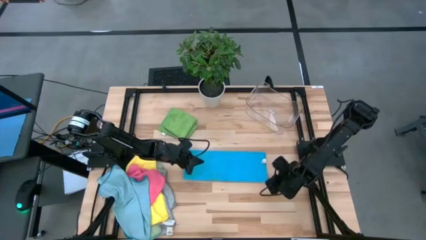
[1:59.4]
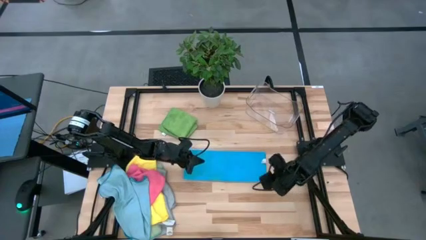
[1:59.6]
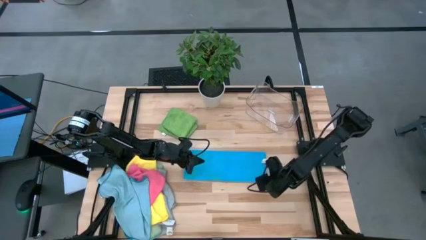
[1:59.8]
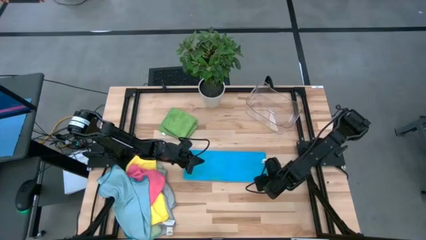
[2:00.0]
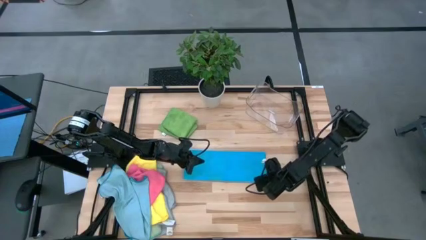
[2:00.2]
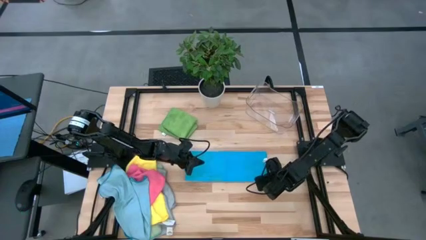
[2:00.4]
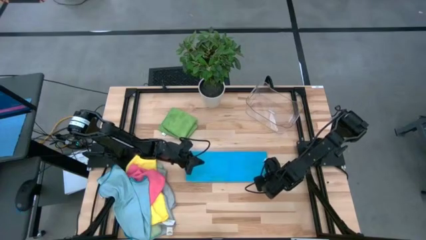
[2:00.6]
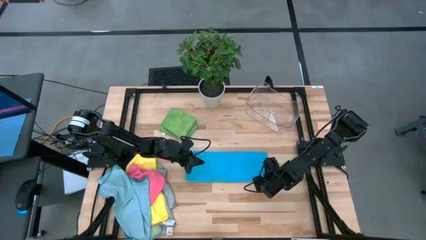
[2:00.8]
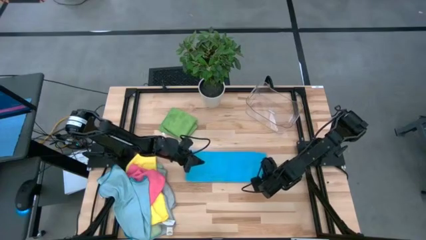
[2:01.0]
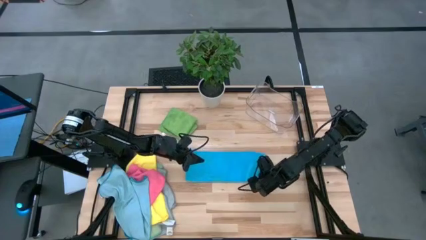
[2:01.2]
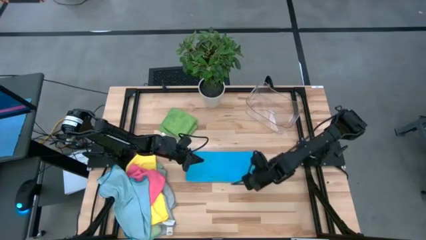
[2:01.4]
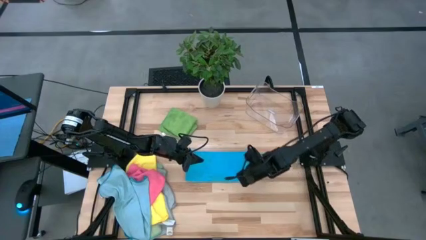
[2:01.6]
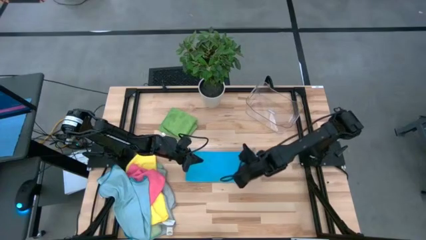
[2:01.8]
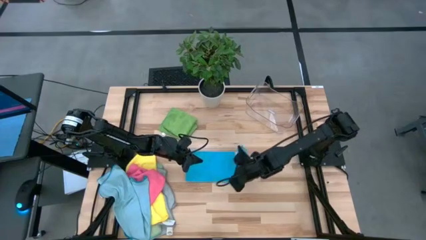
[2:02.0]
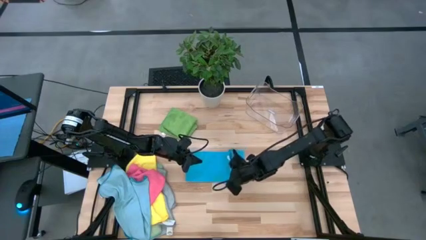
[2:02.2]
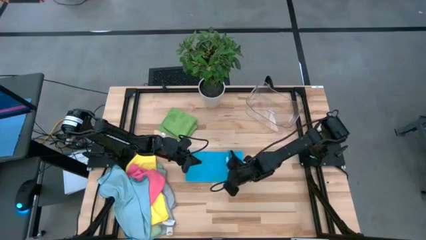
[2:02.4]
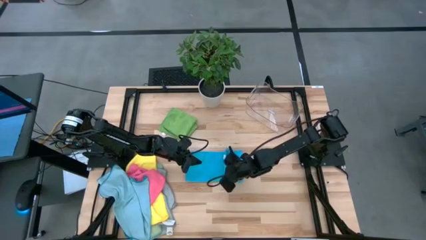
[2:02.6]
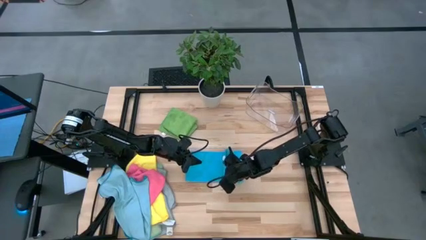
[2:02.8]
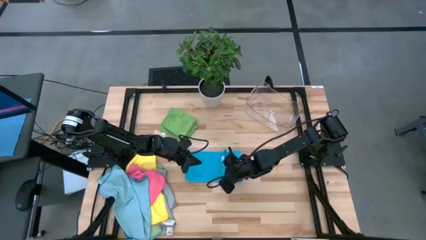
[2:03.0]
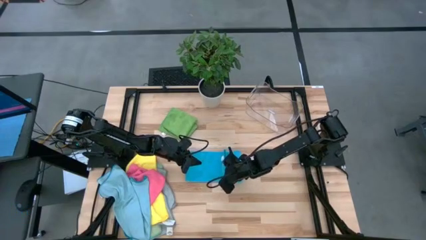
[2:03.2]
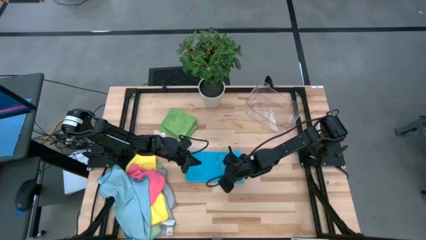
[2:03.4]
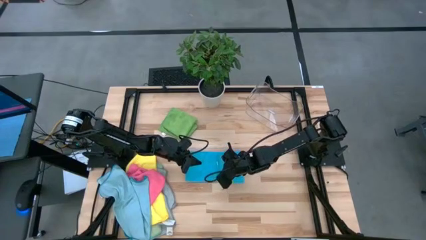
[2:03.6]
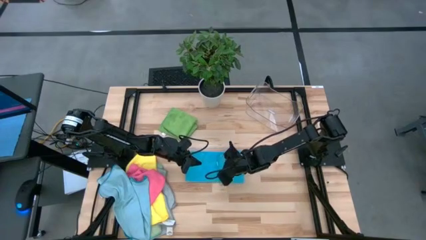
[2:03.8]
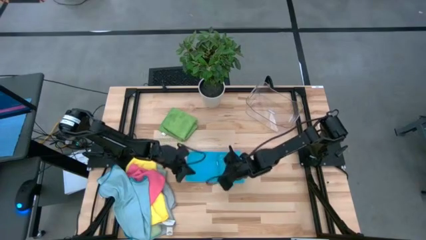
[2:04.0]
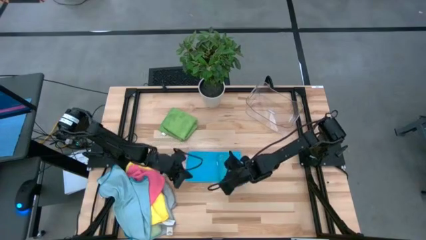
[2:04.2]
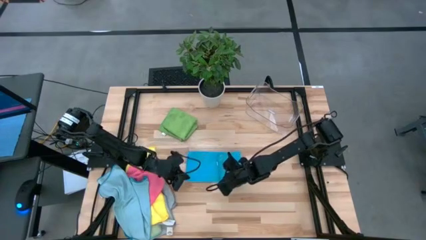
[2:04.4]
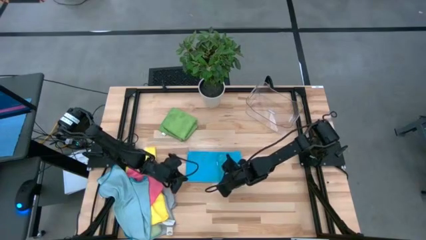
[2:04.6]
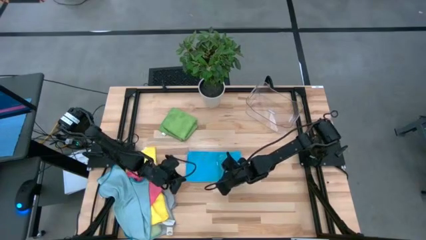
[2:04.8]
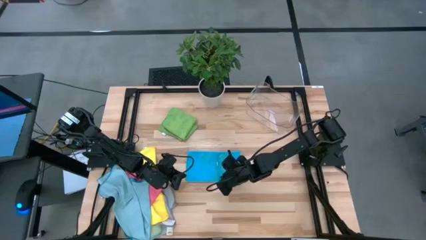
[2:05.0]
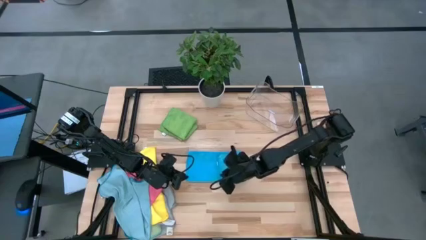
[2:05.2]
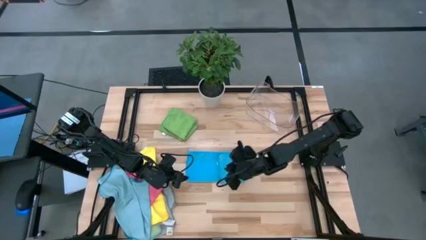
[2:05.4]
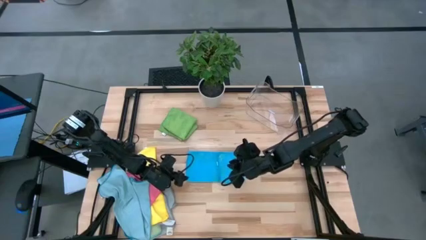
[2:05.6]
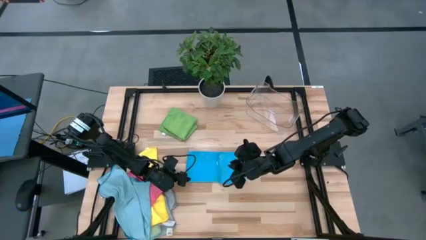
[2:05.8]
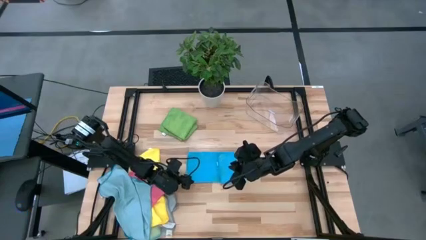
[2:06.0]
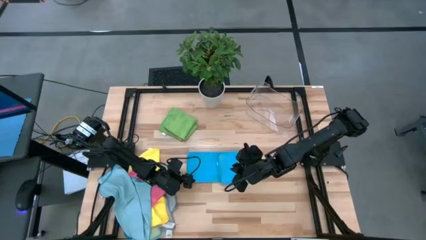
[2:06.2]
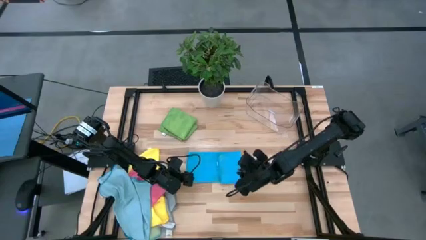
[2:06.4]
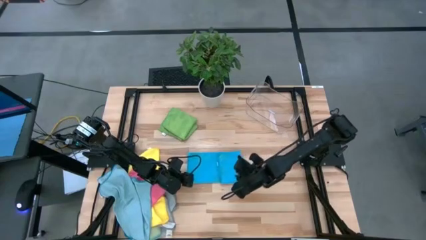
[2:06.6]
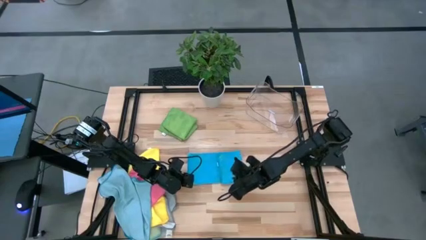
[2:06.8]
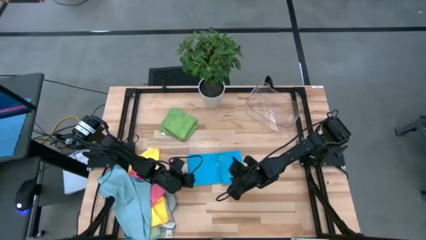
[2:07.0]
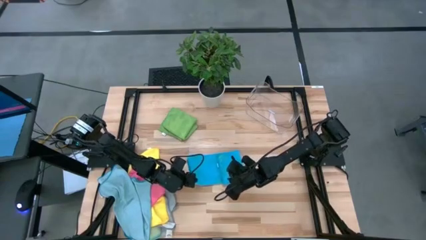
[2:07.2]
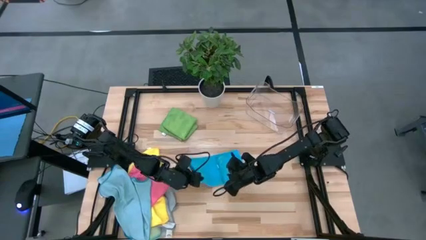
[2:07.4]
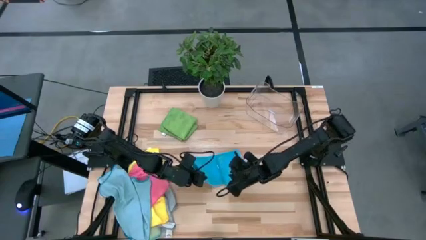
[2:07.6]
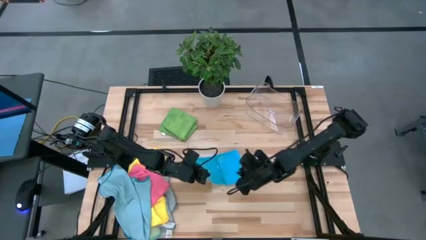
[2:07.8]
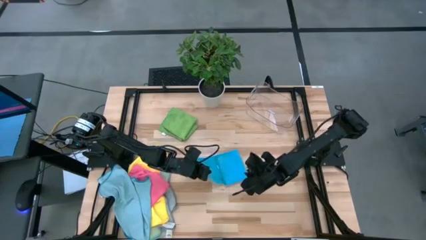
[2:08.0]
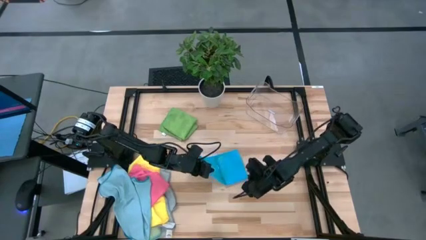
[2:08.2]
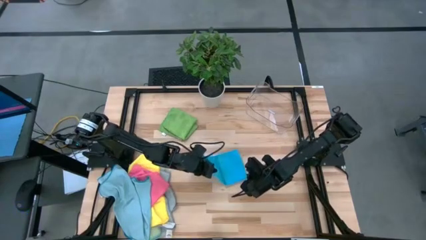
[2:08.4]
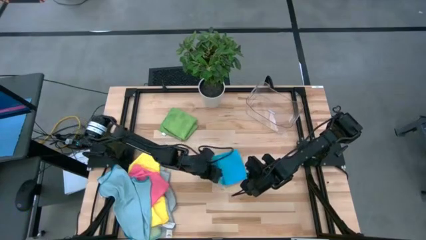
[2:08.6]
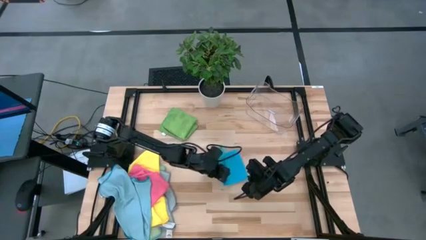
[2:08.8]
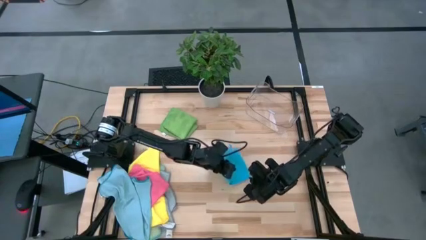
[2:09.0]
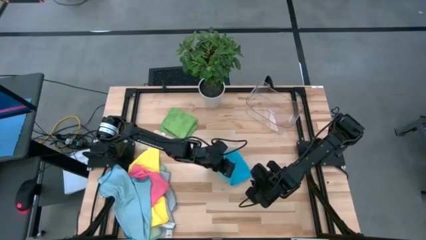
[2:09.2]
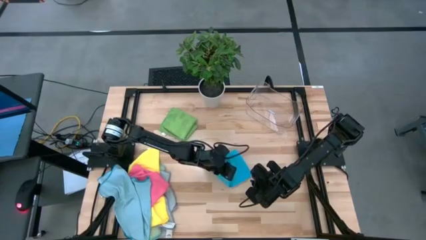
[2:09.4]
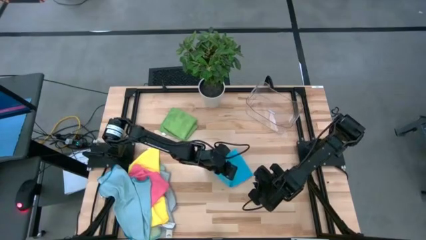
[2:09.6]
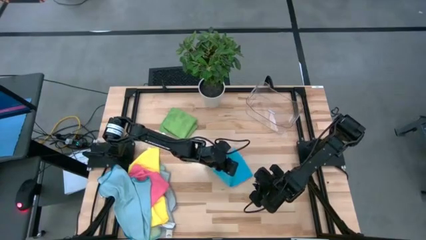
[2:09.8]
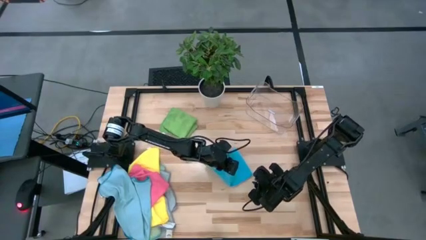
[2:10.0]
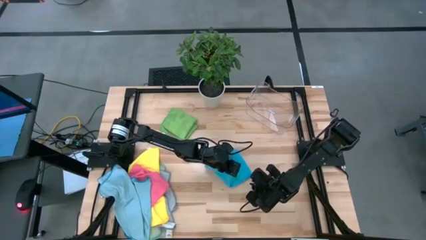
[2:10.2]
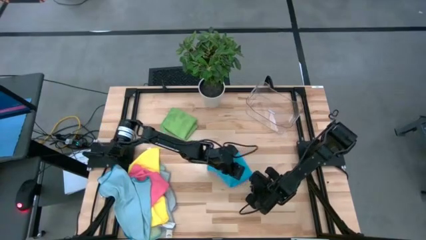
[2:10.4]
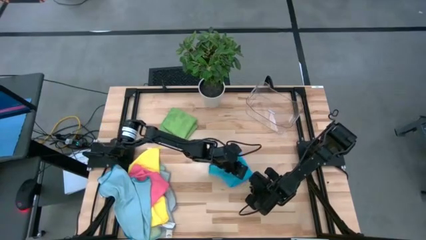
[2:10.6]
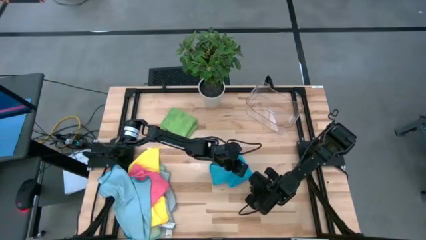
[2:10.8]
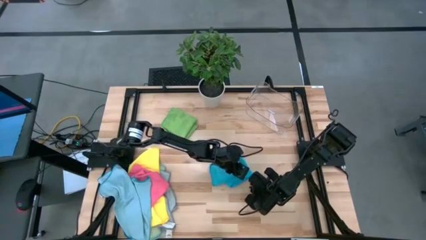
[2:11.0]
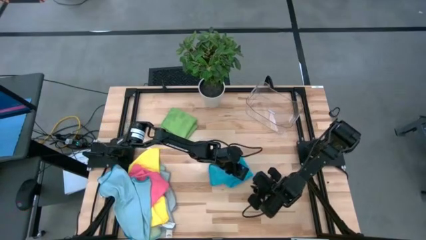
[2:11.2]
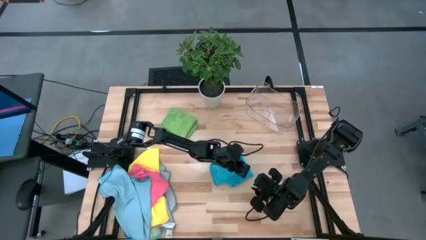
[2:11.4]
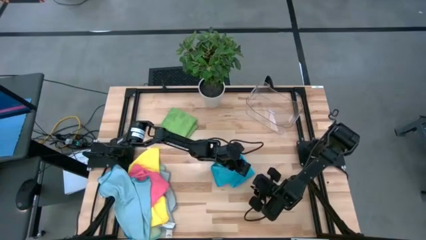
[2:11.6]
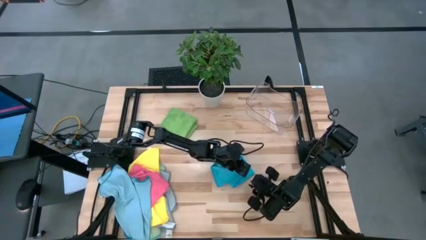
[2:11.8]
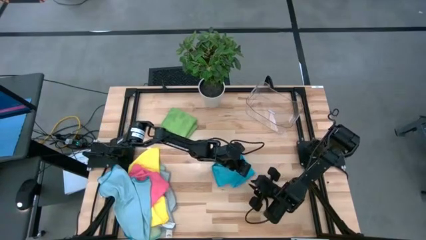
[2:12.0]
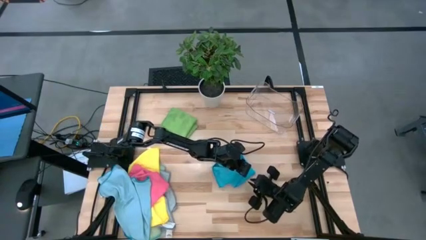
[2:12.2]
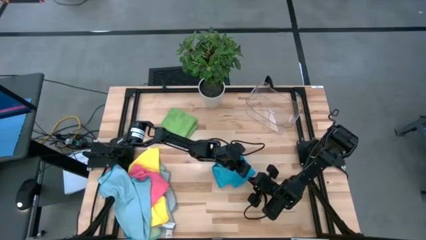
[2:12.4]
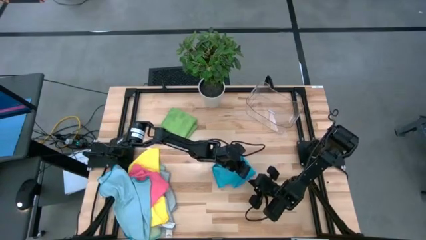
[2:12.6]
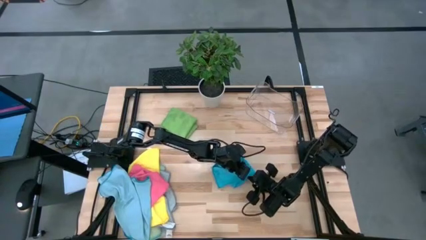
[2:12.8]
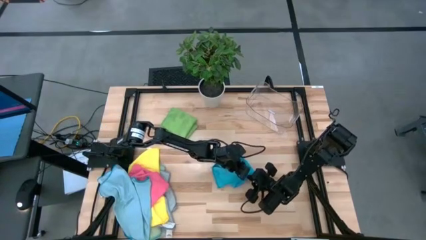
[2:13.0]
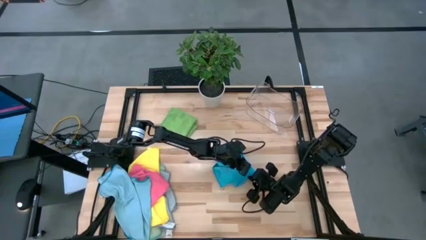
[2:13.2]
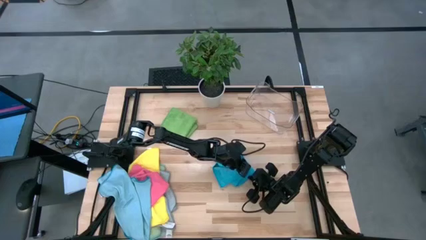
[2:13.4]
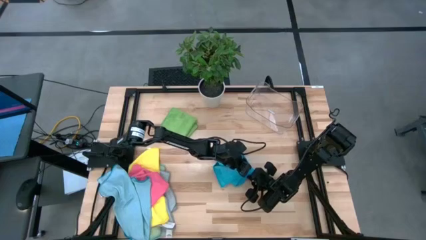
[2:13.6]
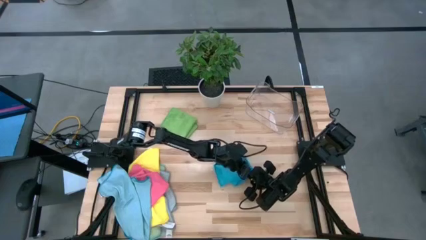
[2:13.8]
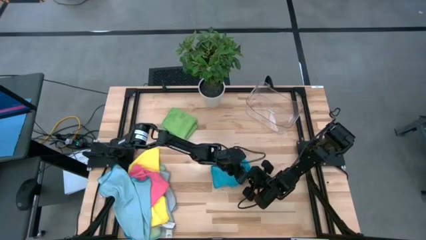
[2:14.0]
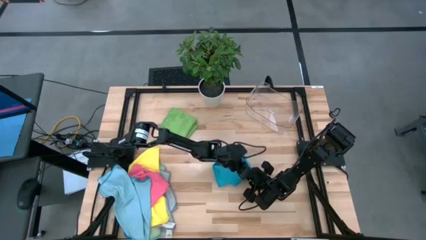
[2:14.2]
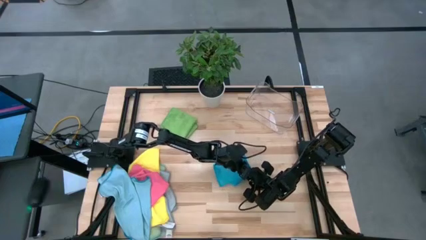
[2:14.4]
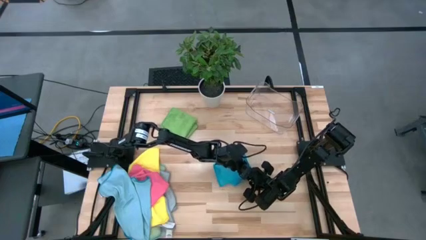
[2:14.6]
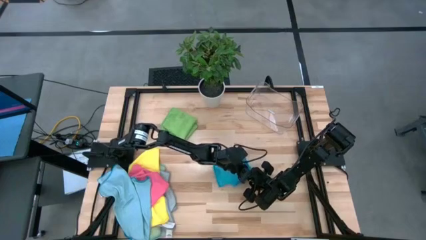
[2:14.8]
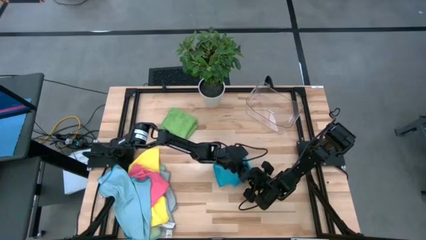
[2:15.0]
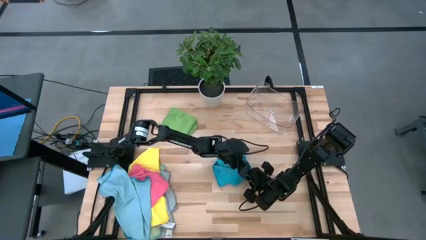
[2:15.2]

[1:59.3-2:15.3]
Task: Fold microfiber towels
Fold the blue microfiber towel

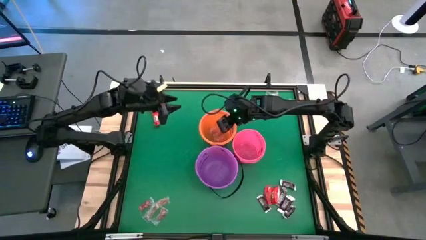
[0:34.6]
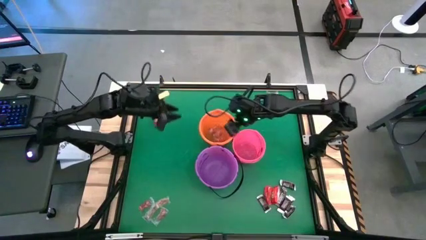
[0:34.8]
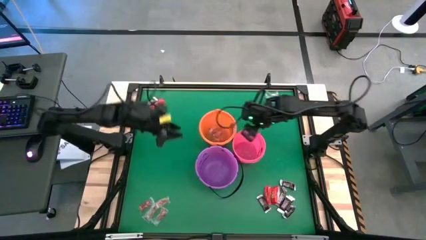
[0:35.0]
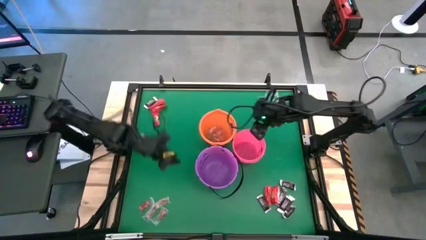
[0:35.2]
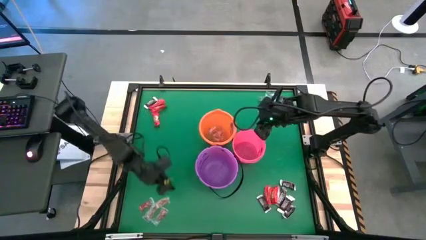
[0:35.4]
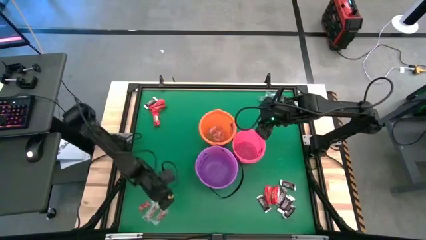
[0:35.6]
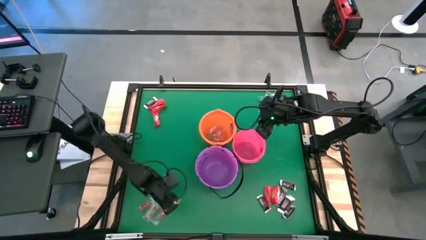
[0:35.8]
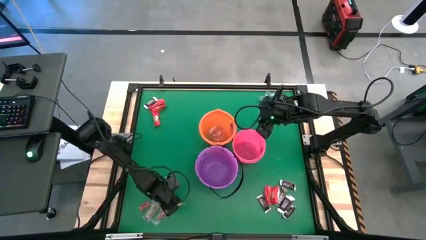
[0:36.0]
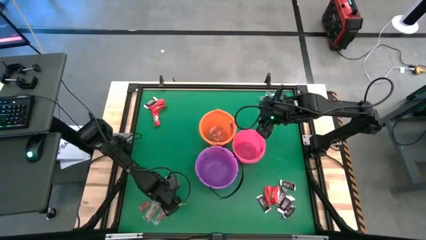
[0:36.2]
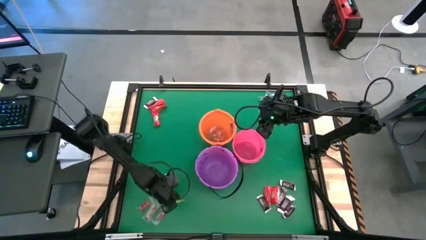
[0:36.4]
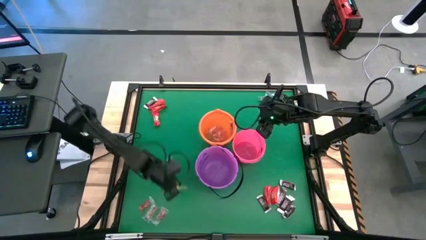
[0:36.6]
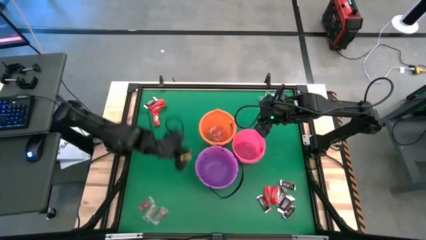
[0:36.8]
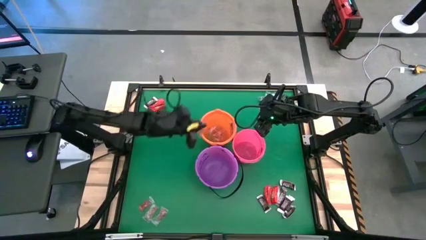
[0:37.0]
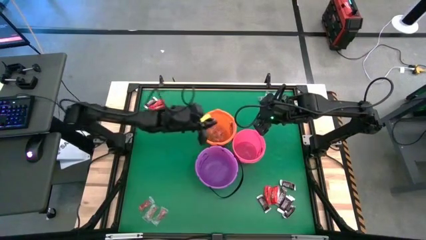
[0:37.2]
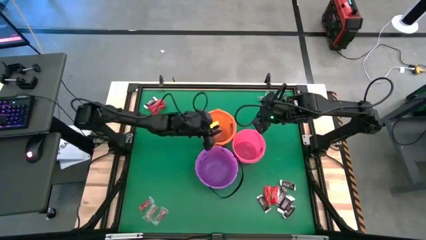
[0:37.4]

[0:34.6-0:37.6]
Task: Sort candy by brand, put in halloween buckets
Put the orange gummy into the orange bucket
